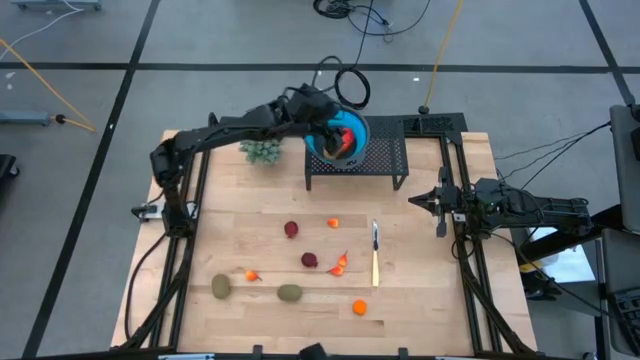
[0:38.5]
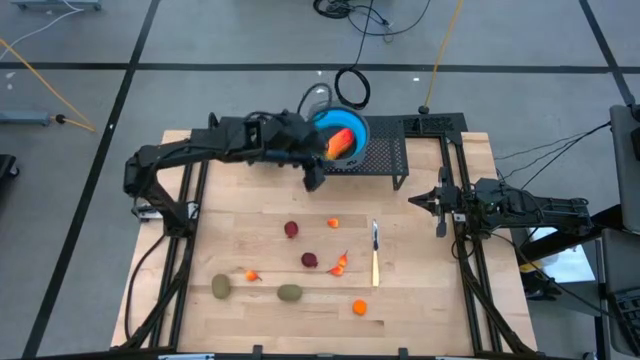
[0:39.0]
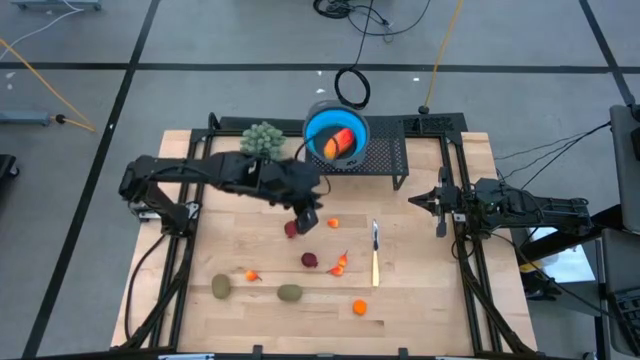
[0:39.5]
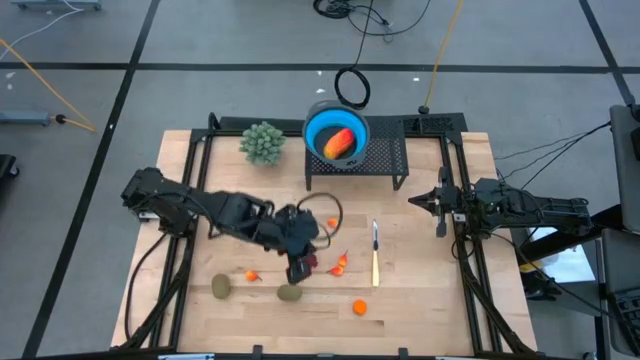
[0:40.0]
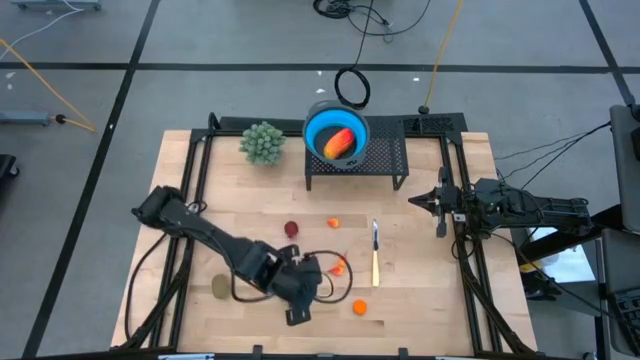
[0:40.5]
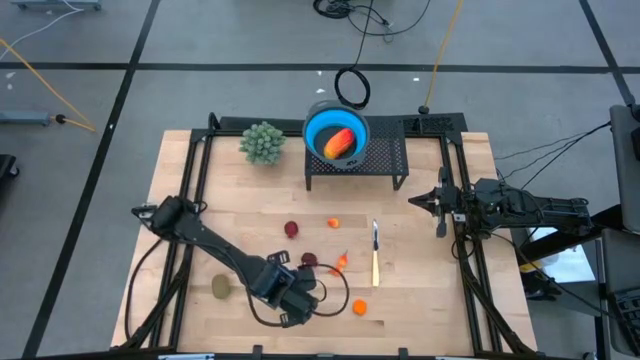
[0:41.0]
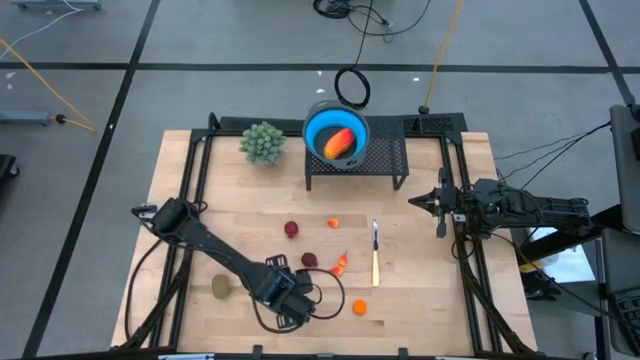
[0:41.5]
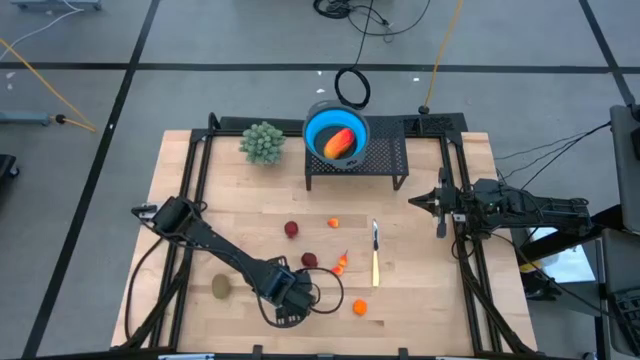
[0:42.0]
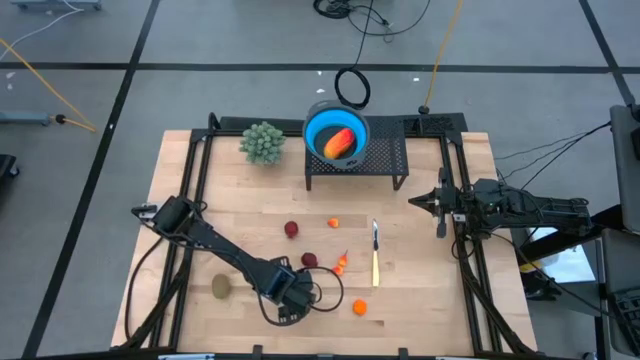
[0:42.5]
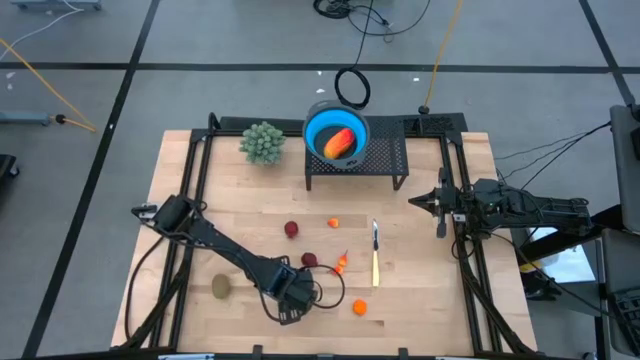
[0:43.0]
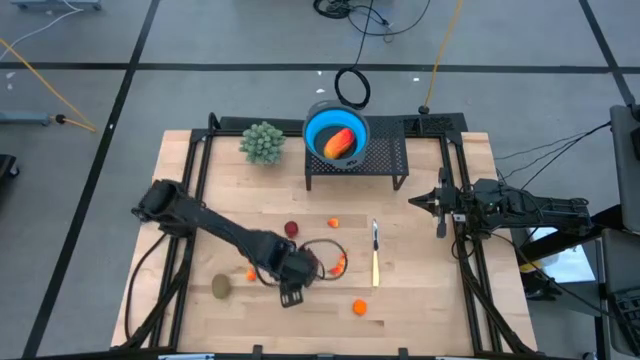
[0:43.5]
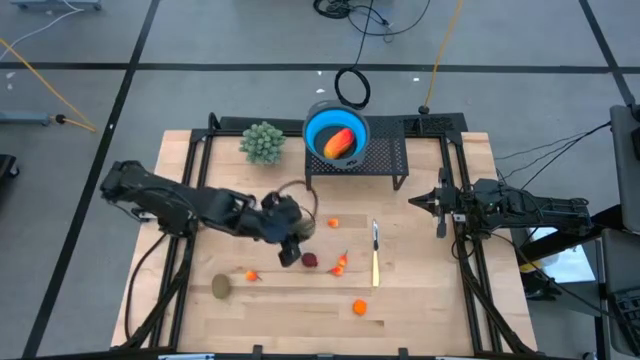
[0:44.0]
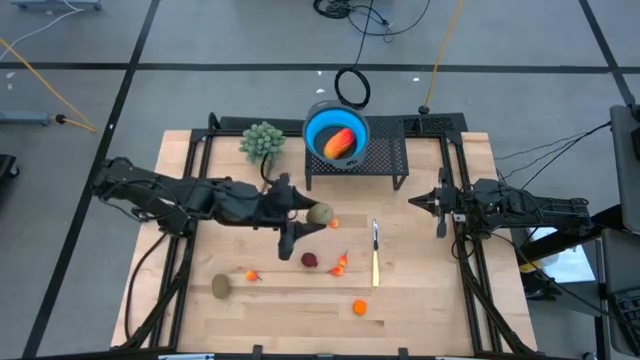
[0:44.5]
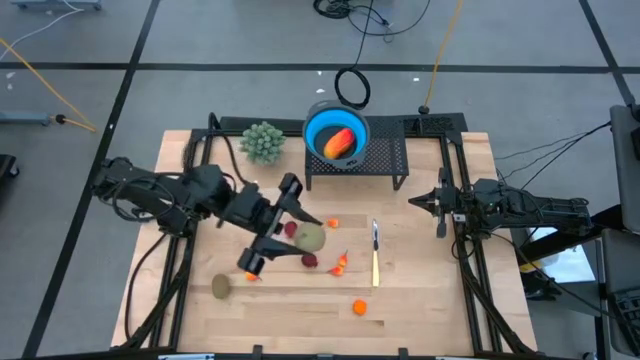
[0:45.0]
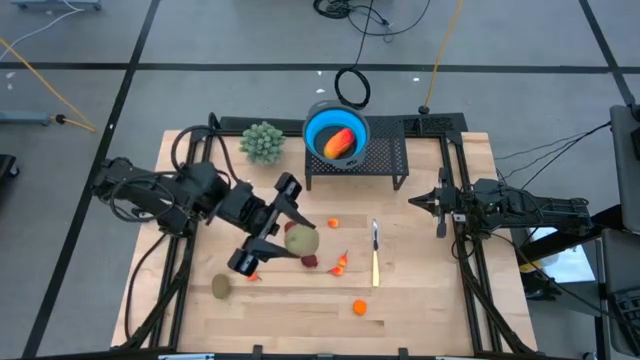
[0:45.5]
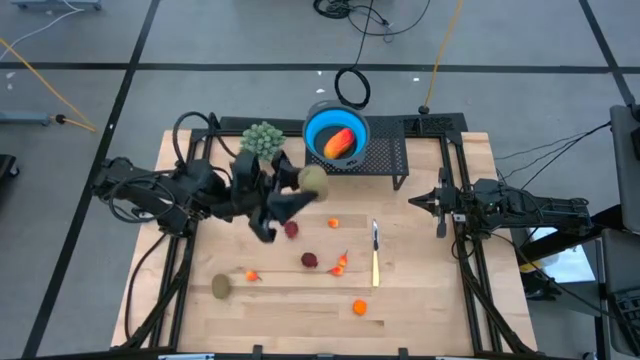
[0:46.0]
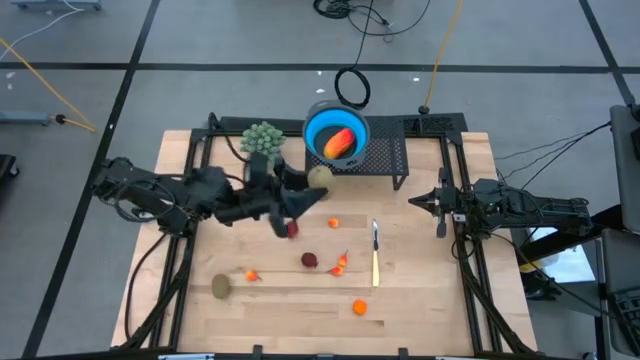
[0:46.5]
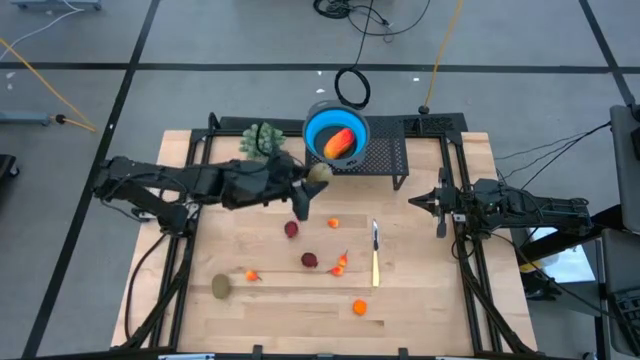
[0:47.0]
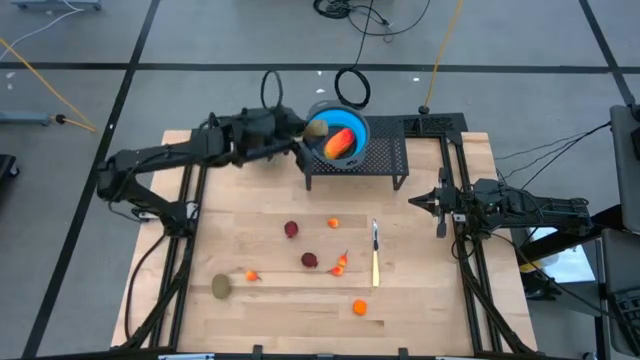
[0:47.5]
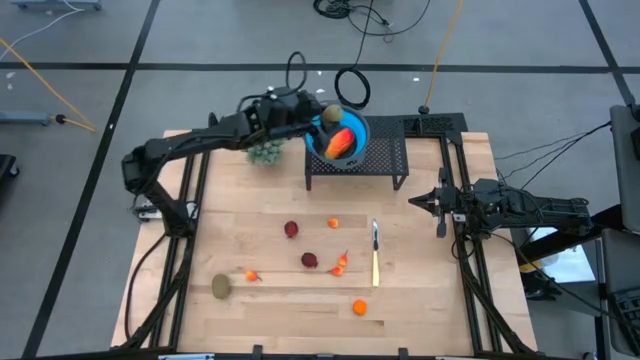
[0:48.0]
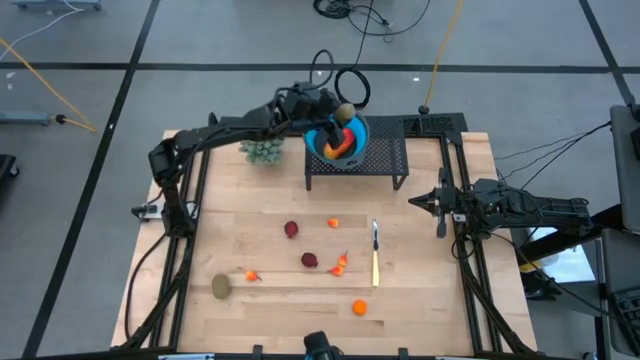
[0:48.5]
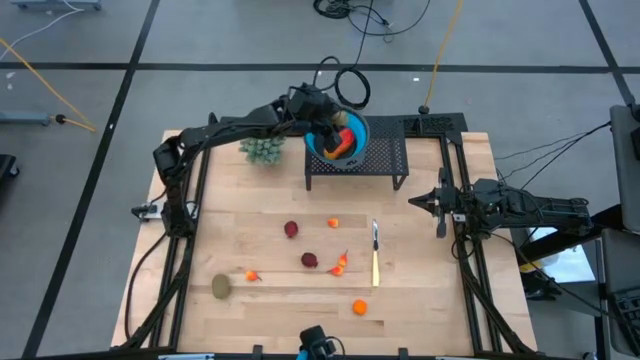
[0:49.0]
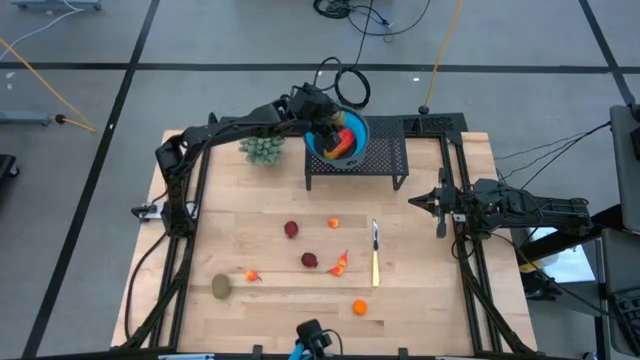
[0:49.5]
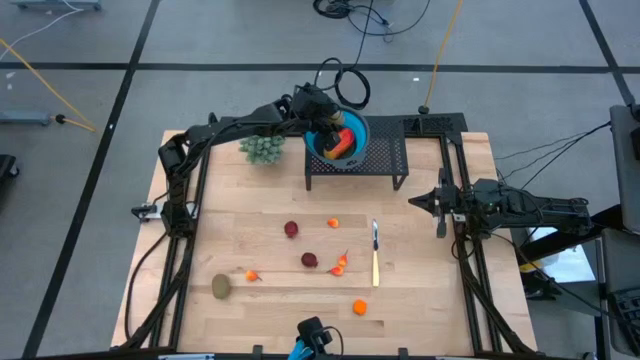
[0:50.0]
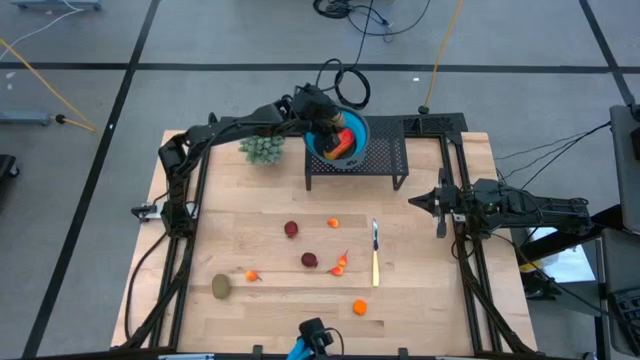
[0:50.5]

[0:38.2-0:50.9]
Task: Pick & Place Fruit
Put the brown kiwi into the blue strainer bowl on the shelf

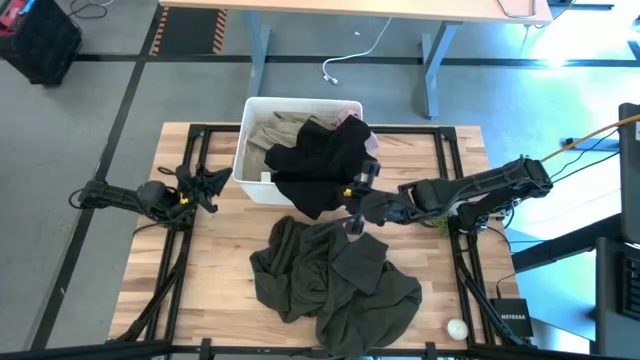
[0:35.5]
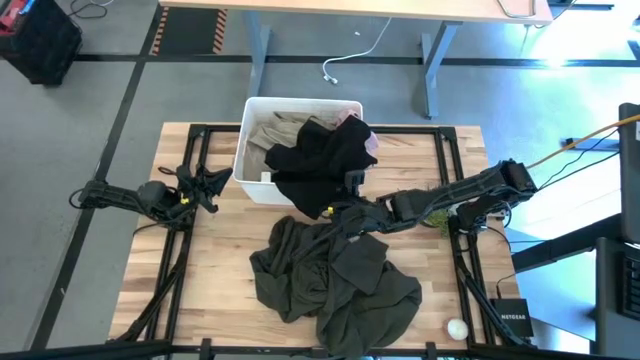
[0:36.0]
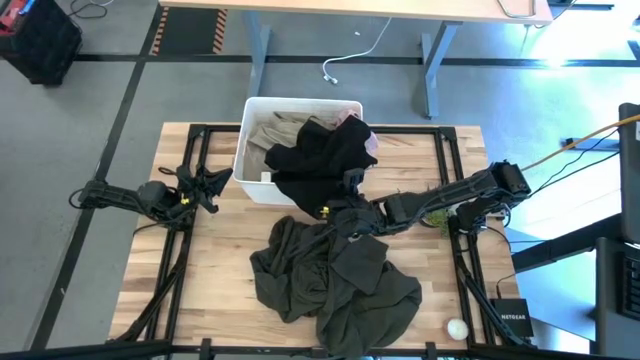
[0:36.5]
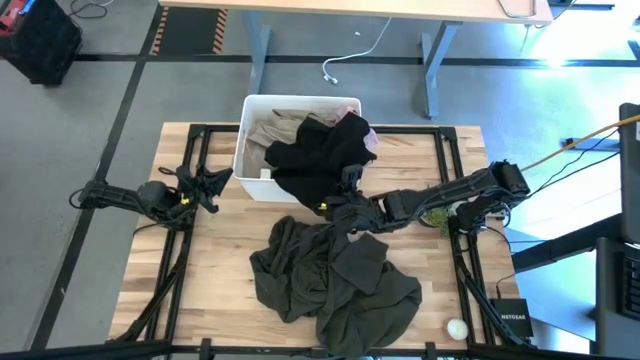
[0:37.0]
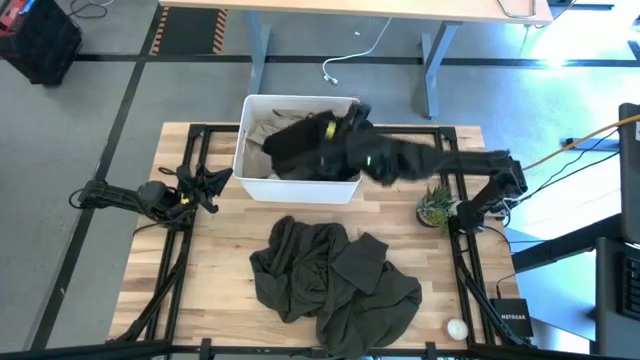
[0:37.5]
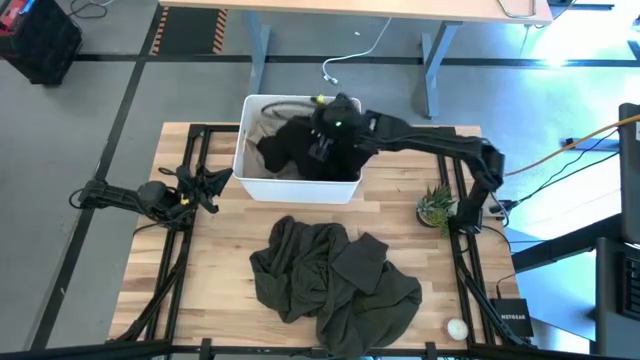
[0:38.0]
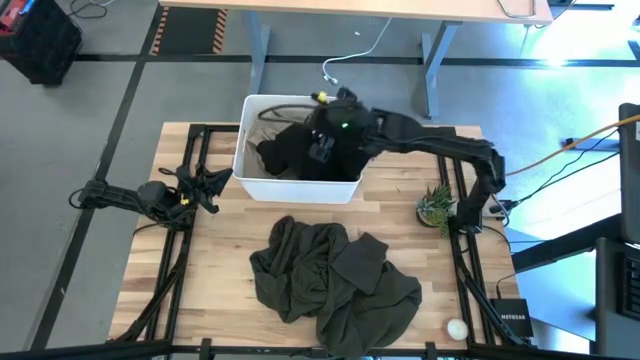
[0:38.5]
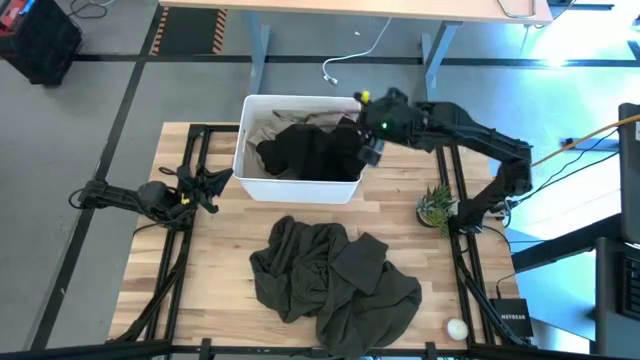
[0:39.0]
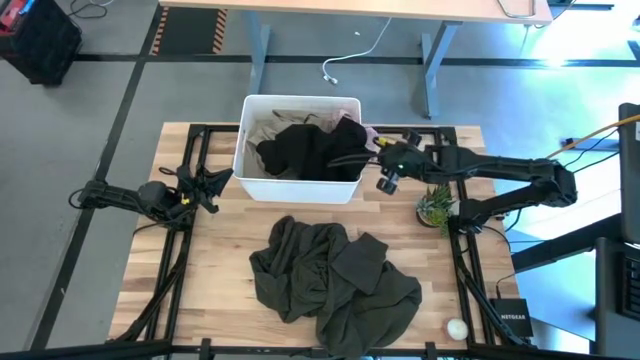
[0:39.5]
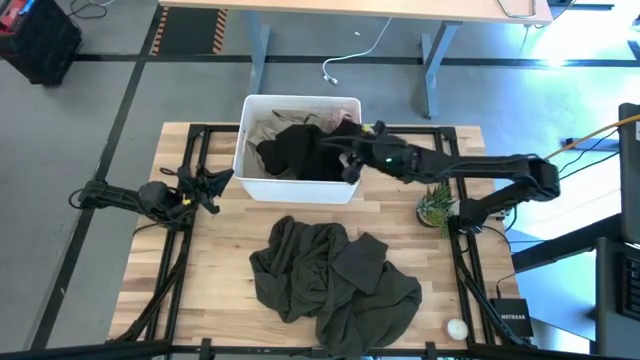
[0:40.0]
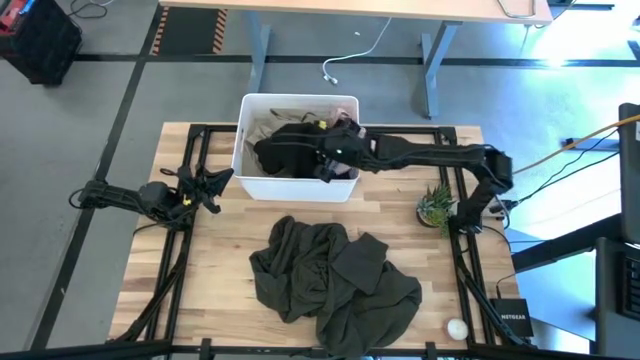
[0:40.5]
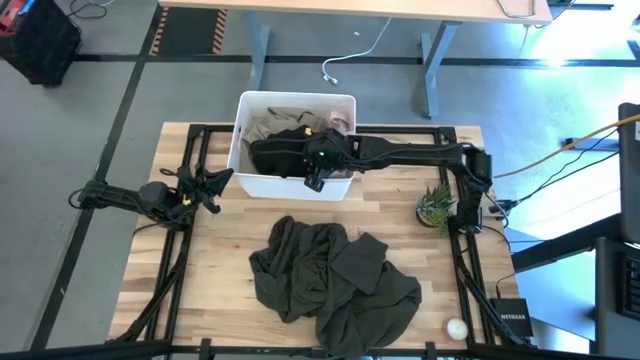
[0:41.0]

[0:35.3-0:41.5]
Task: Sort clothes
Put the black shirt into the white bin

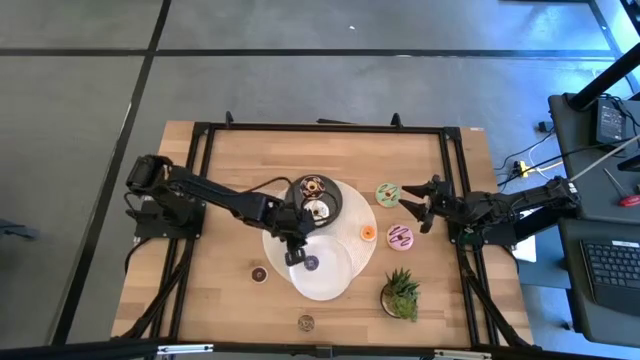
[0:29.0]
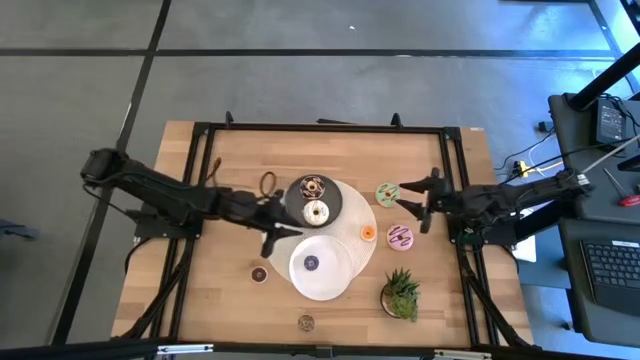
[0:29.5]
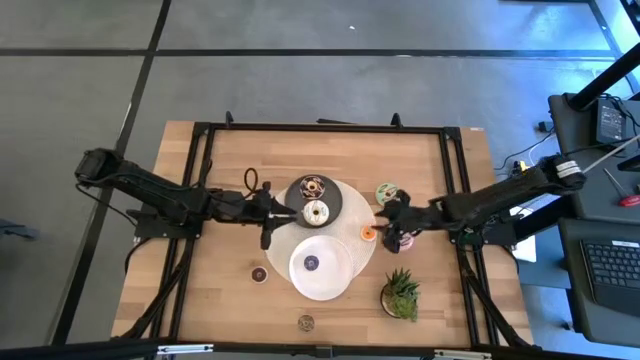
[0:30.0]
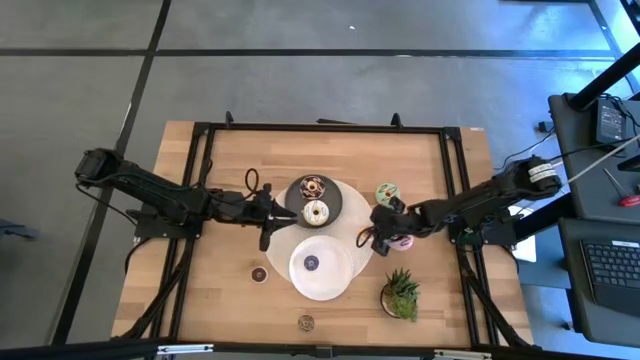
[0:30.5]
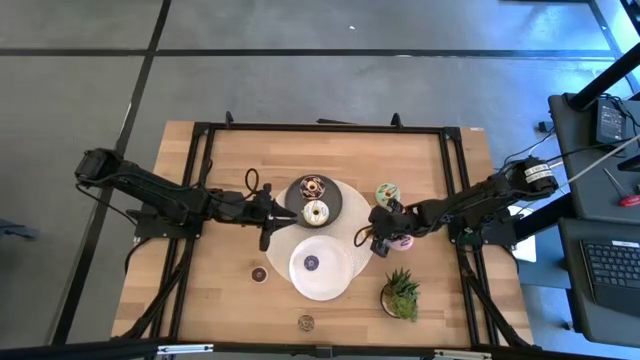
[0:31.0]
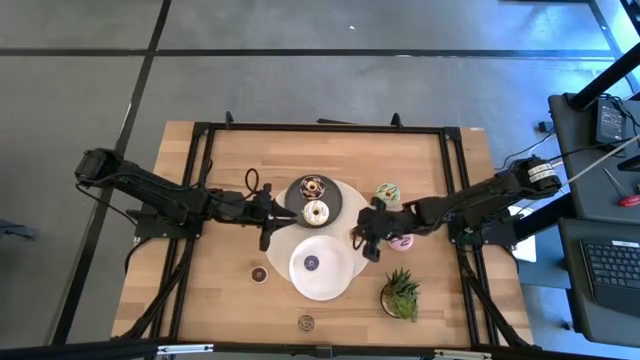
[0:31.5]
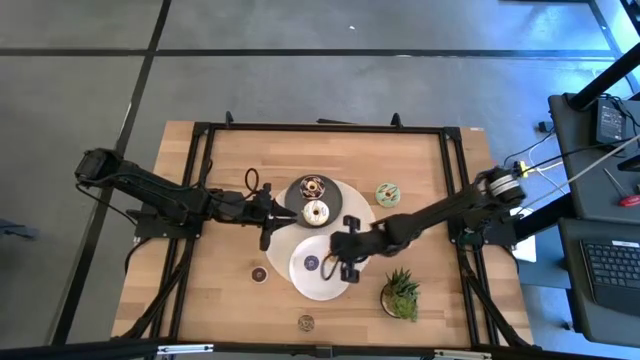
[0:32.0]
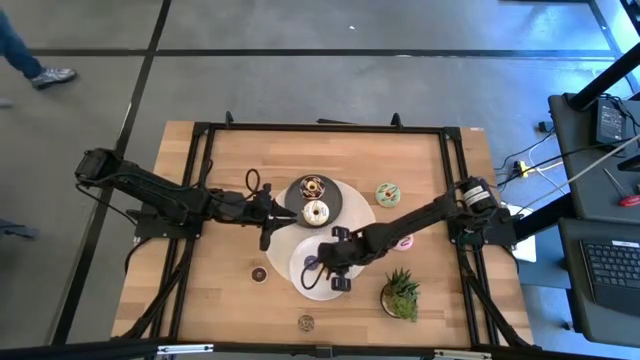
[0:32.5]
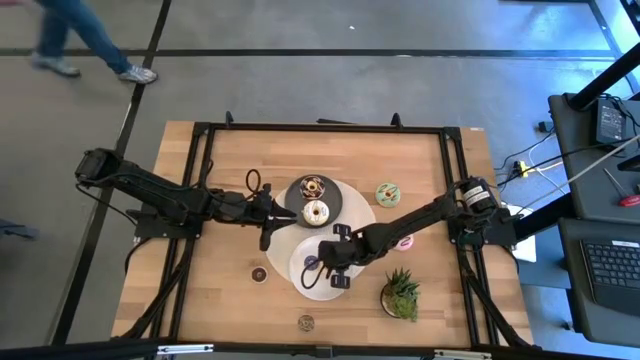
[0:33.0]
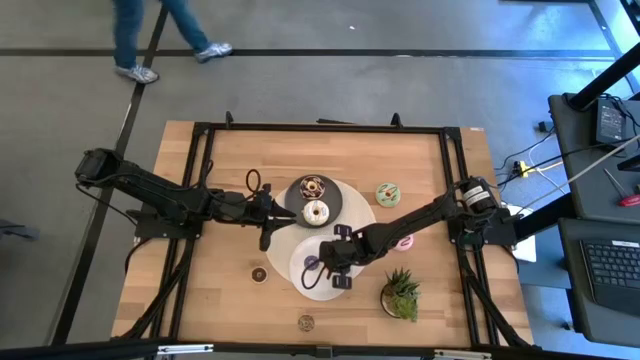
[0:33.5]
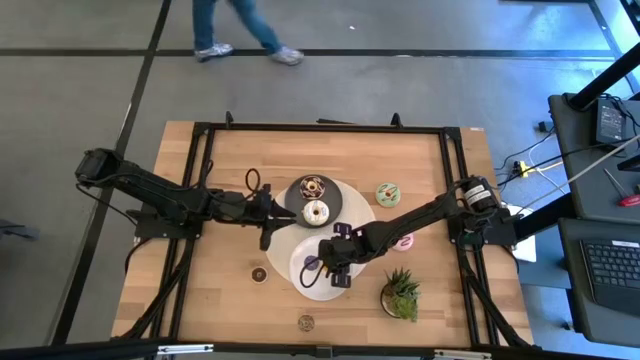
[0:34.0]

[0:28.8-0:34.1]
Task: Pick & Place donuts
Put the small orange donut on the white plate
